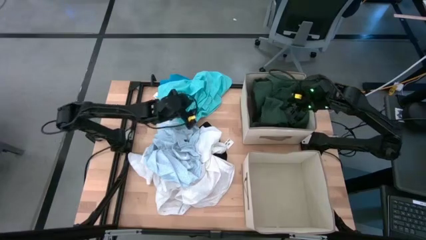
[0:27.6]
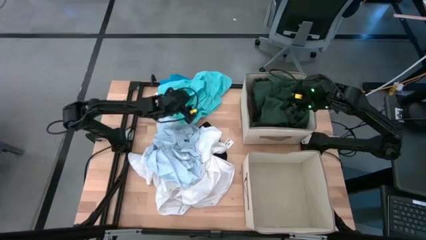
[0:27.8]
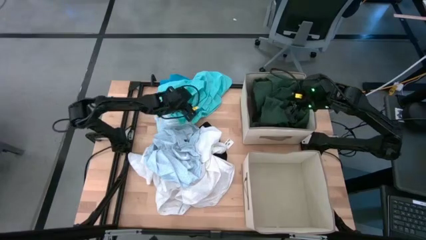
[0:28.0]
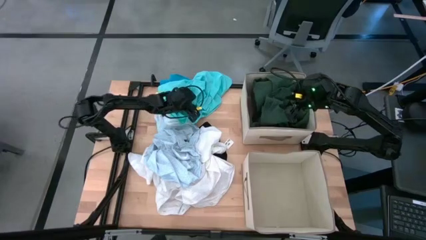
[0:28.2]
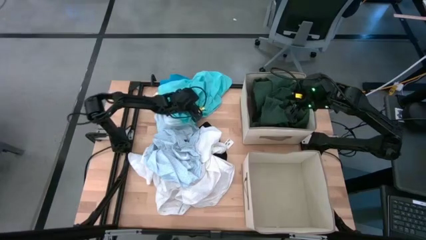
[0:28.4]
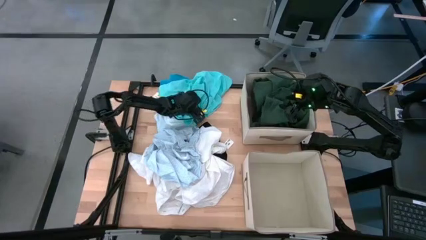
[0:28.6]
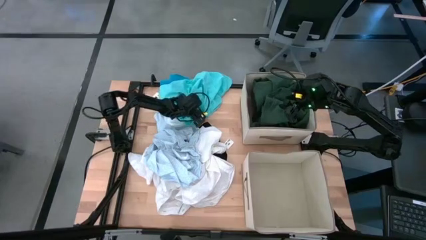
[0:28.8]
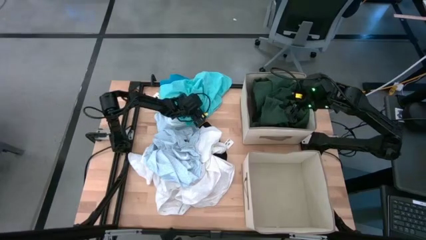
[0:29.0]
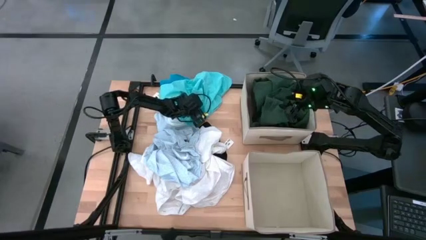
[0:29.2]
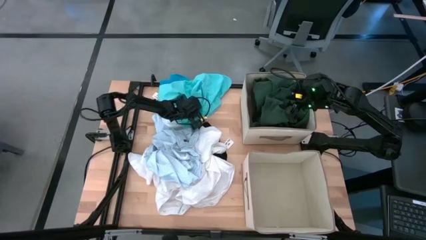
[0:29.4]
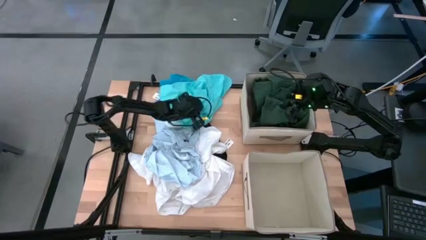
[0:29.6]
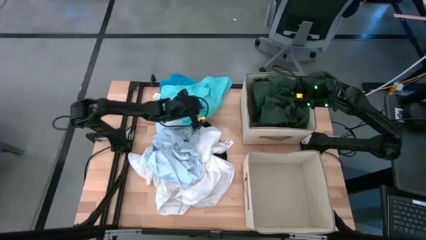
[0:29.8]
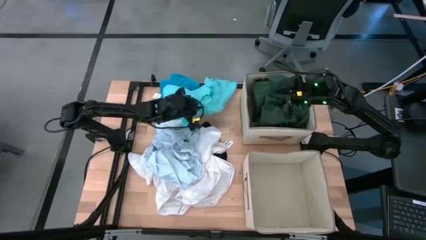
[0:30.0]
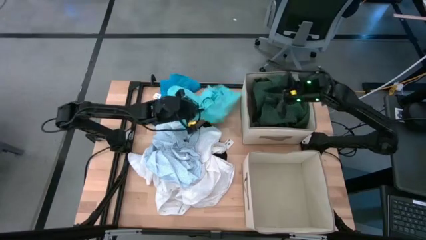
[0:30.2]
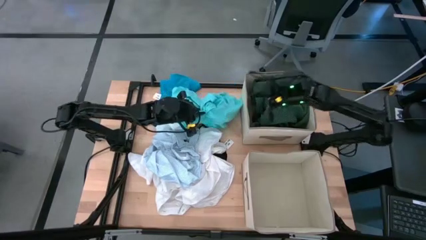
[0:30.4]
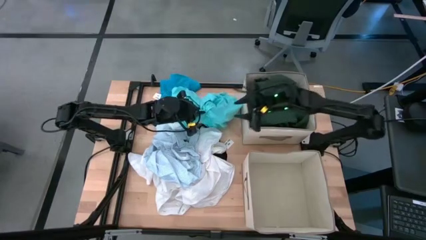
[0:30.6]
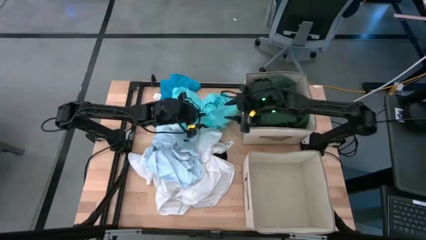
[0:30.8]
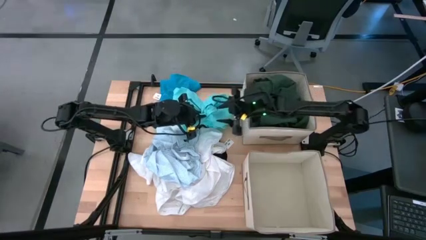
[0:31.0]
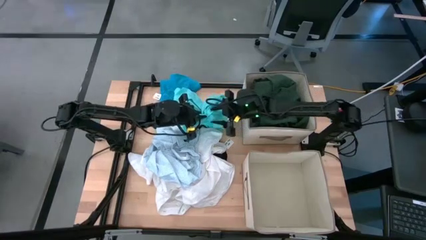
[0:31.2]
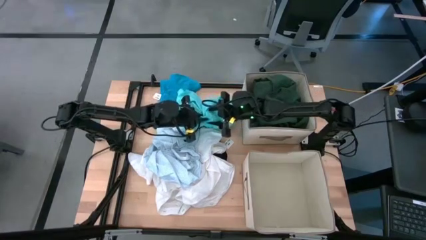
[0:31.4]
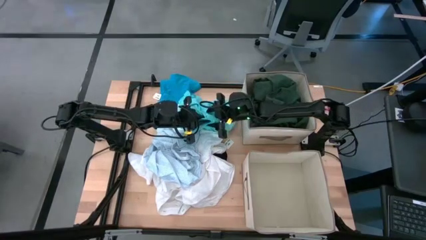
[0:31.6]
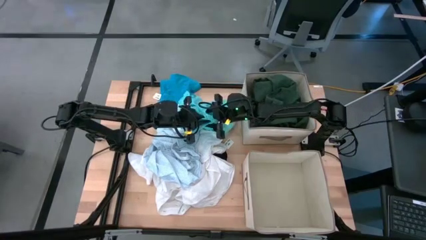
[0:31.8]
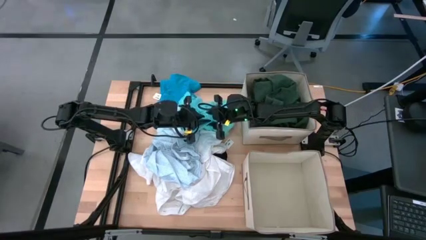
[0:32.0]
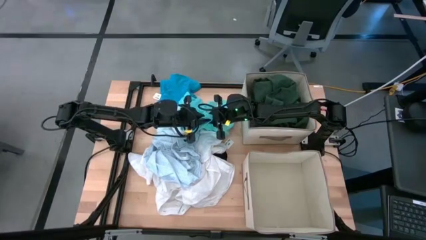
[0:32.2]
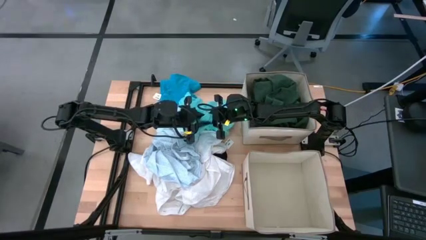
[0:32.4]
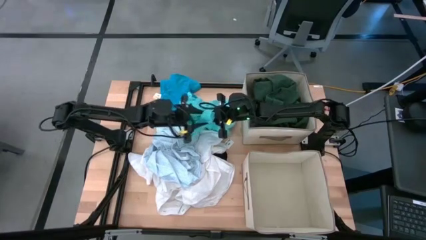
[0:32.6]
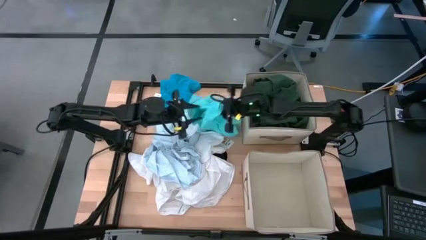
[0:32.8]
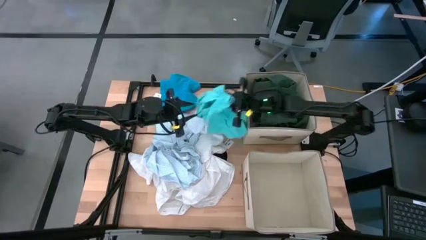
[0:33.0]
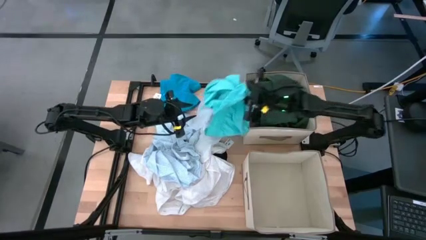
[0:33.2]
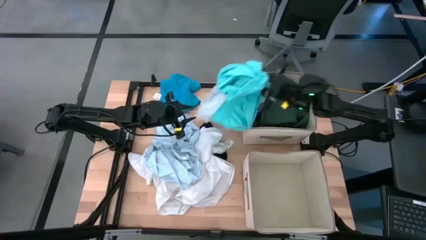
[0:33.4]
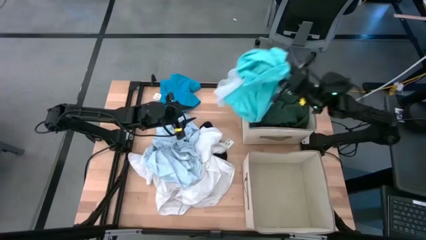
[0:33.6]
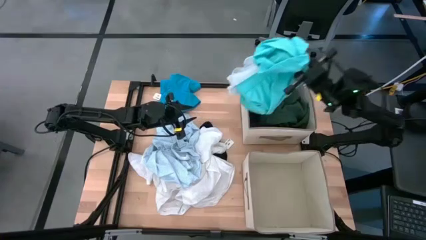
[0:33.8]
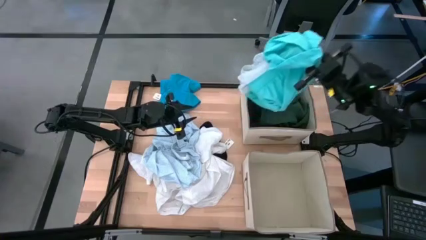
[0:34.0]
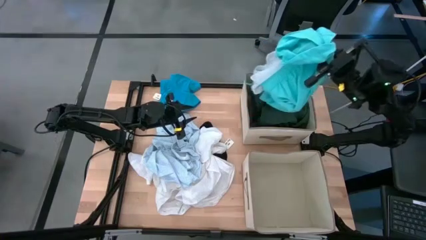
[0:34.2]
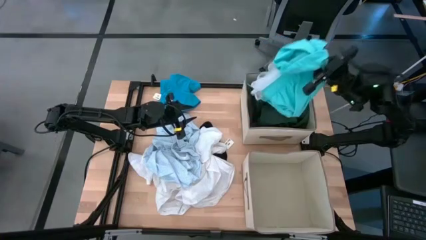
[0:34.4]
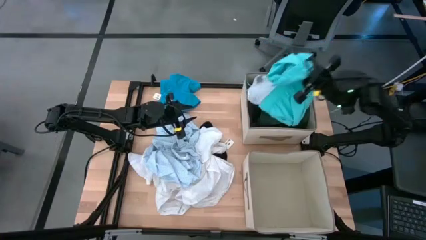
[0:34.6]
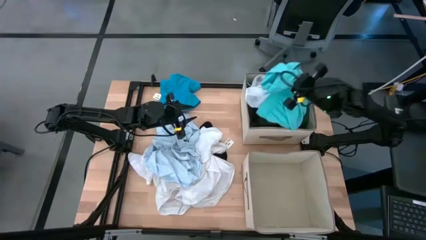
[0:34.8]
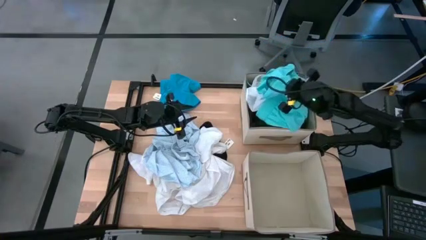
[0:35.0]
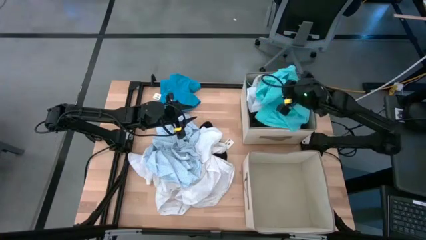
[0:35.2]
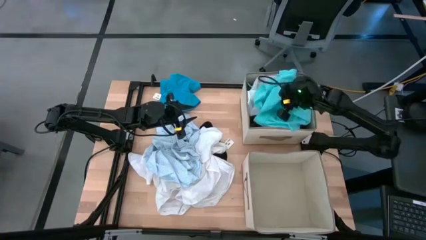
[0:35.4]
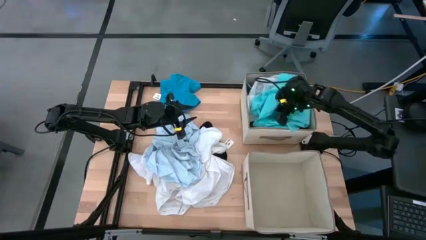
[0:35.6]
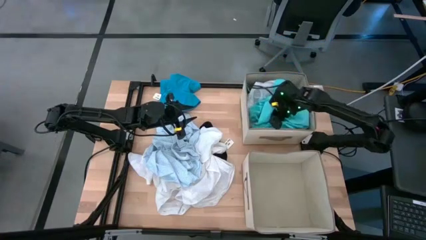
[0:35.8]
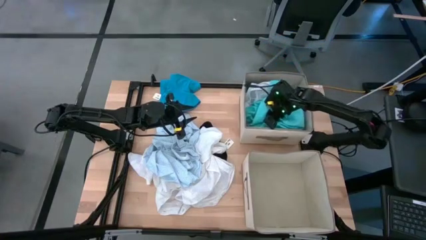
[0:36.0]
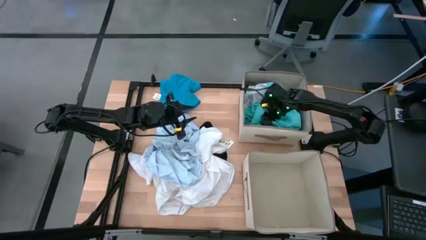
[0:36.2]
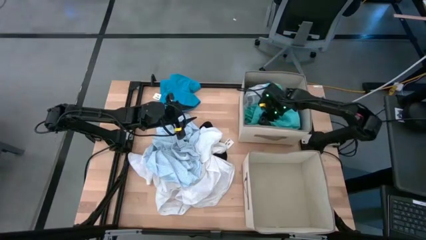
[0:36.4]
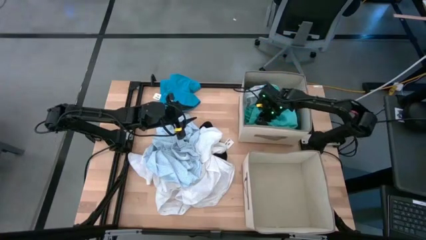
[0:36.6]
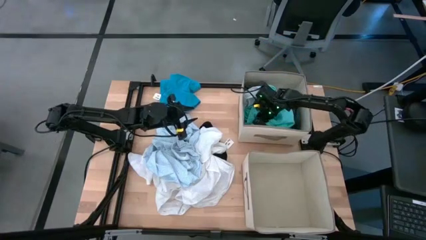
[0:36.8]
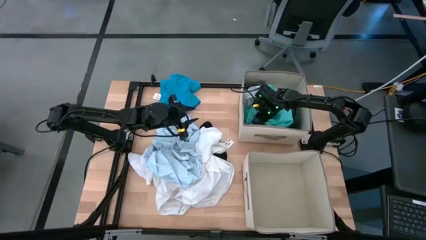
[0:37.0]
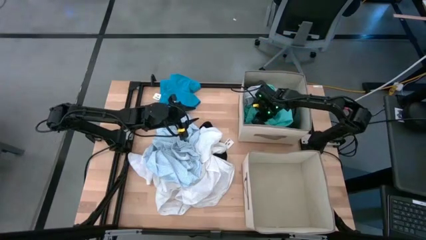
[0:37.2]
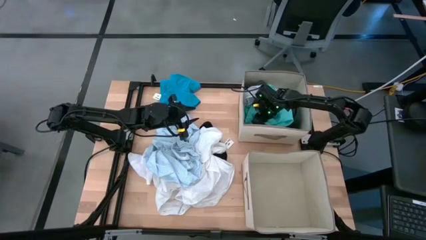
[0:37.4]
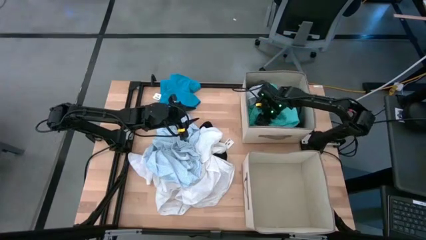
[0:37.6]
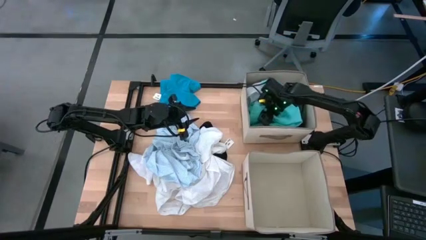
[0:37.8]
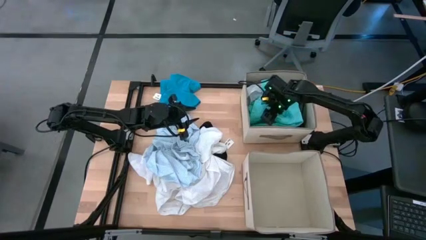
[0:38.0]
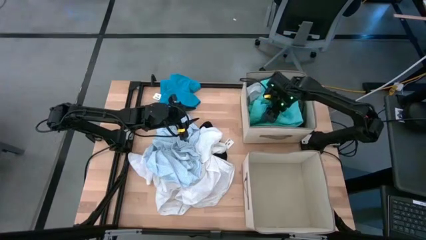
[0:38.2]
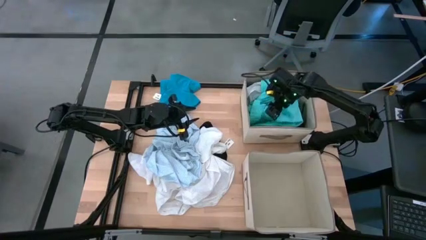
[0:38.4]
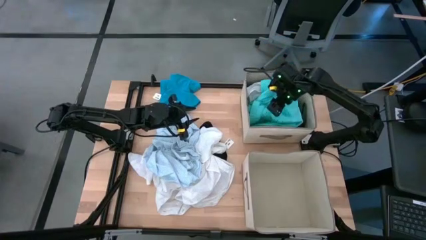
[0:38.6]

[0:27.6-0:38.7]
Task: Sort clothes
Put the light green shorts into the top bin
